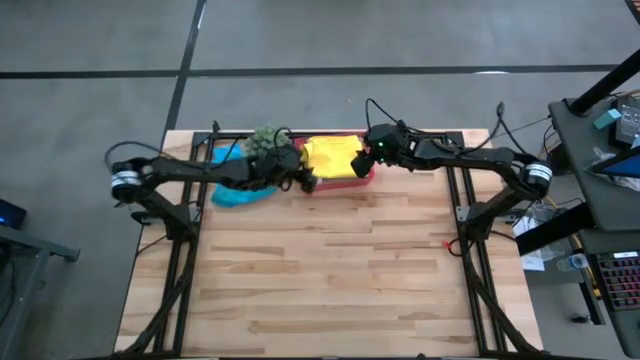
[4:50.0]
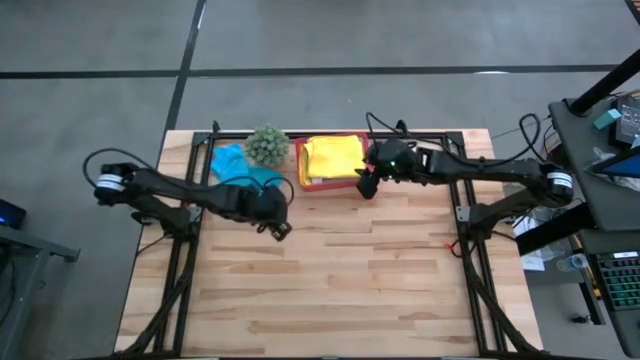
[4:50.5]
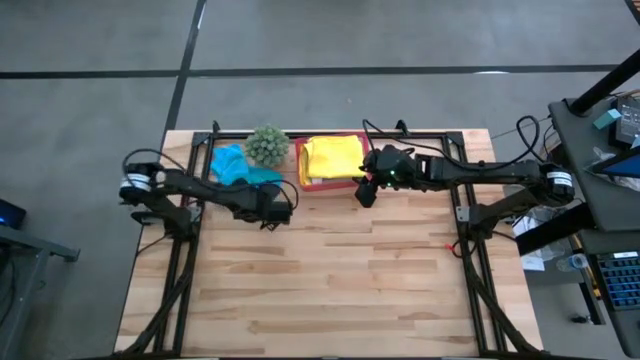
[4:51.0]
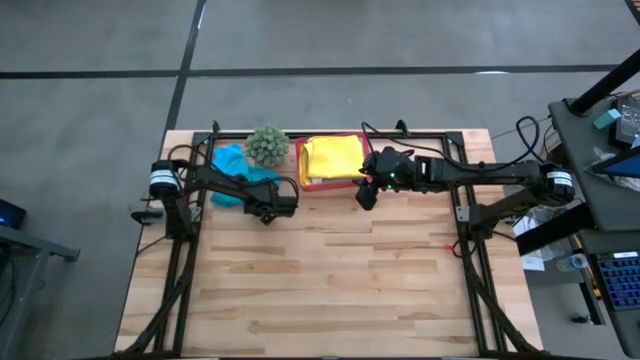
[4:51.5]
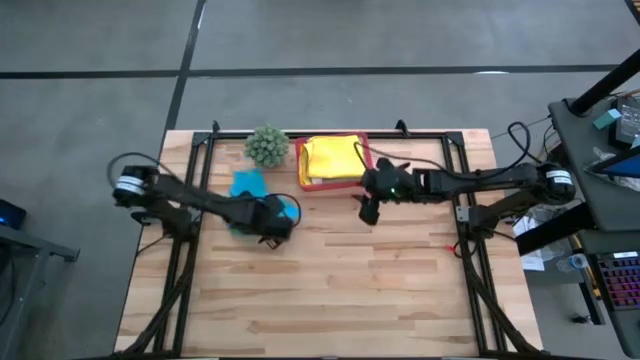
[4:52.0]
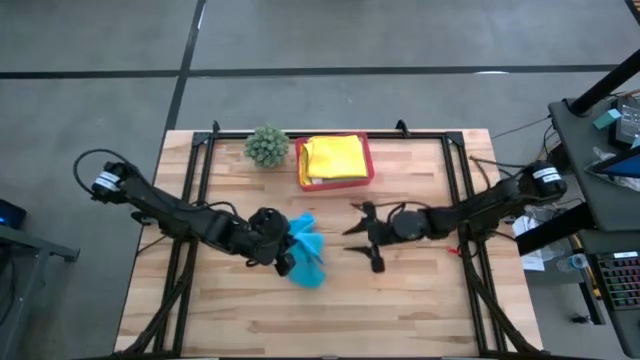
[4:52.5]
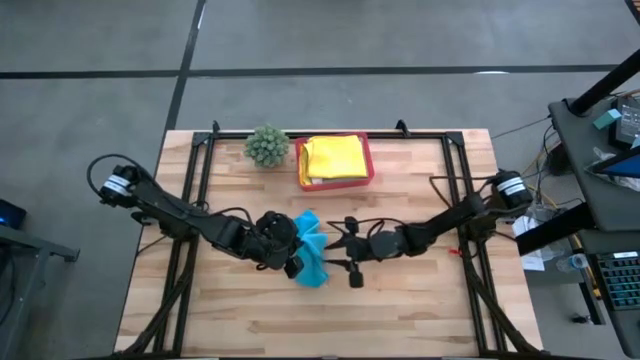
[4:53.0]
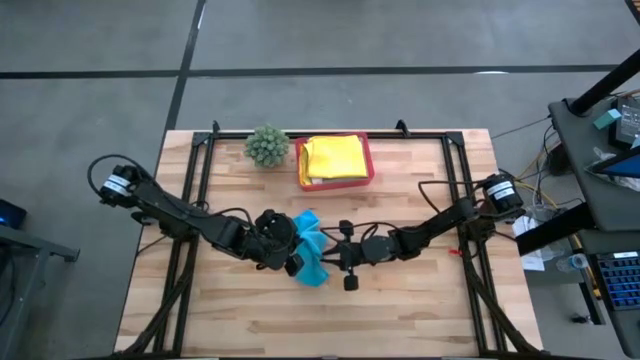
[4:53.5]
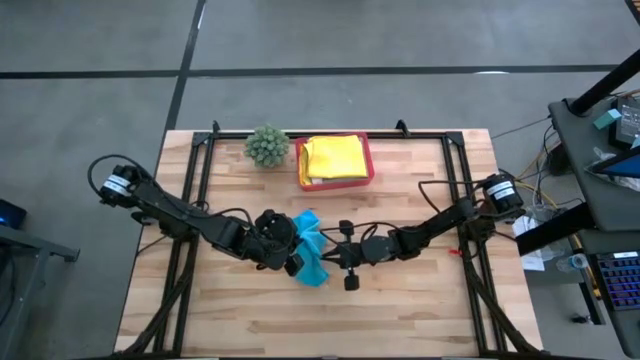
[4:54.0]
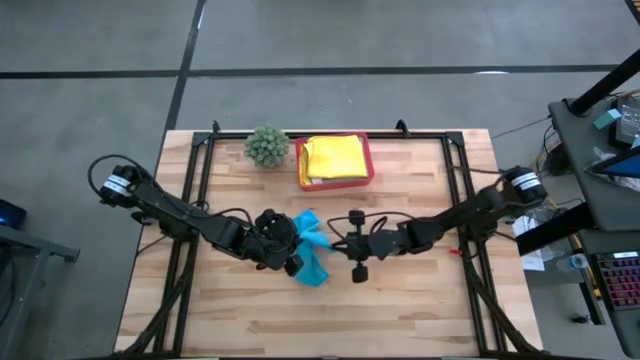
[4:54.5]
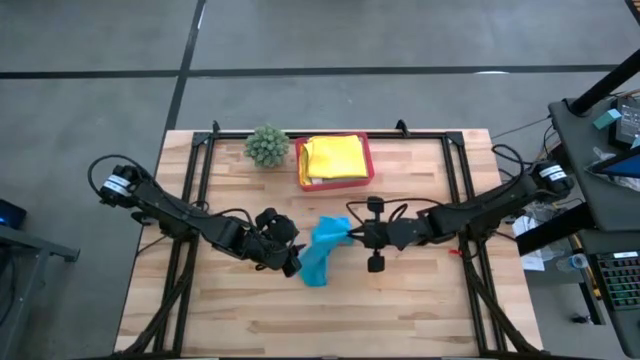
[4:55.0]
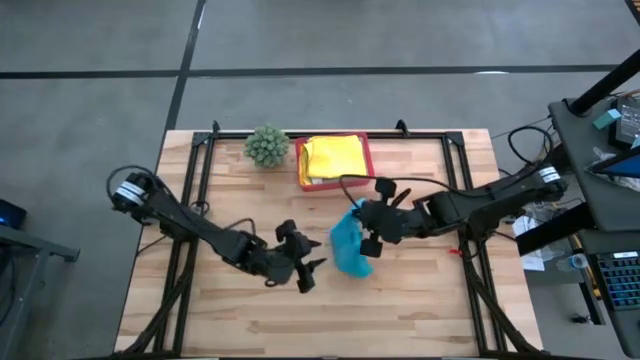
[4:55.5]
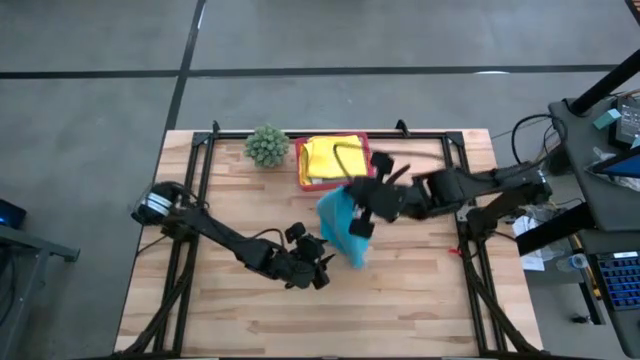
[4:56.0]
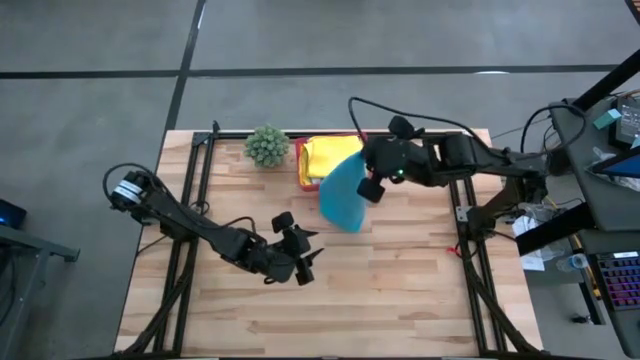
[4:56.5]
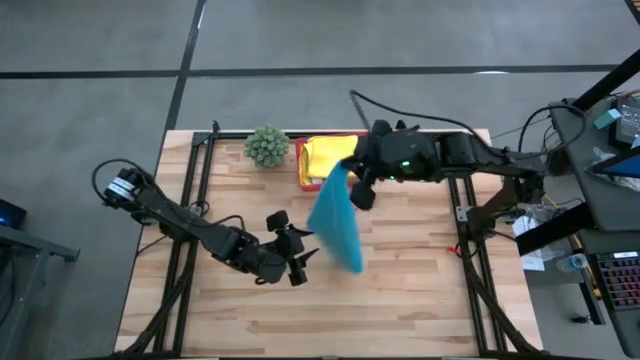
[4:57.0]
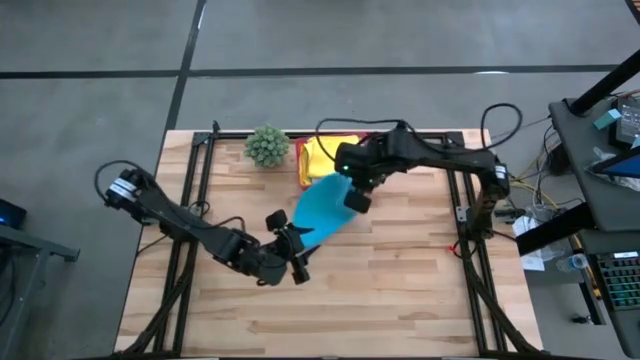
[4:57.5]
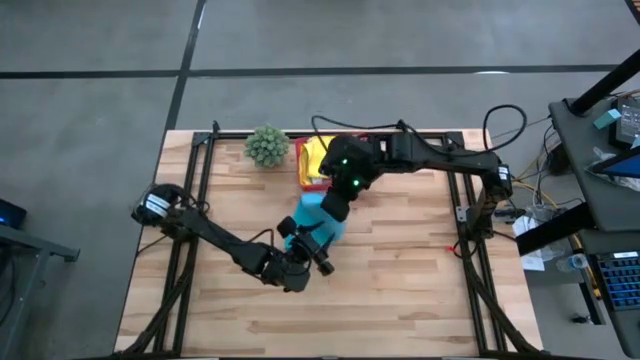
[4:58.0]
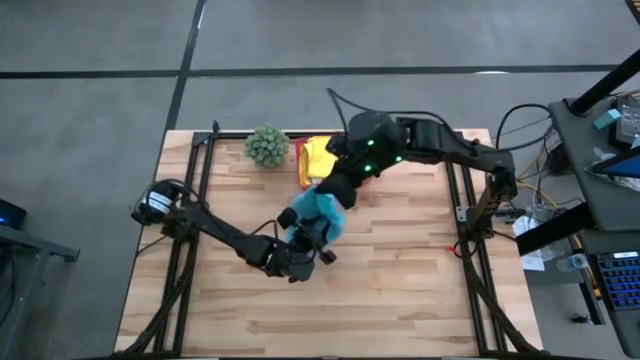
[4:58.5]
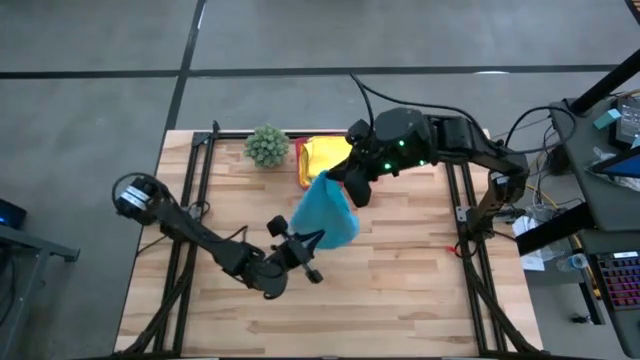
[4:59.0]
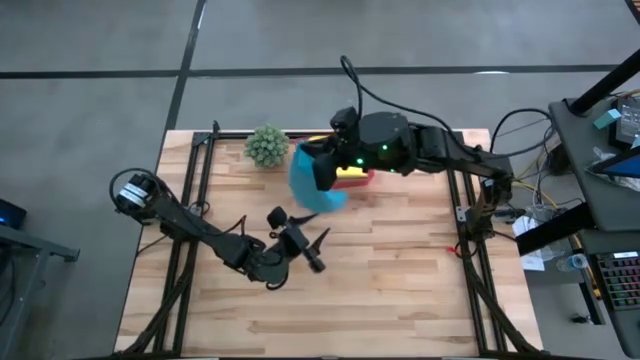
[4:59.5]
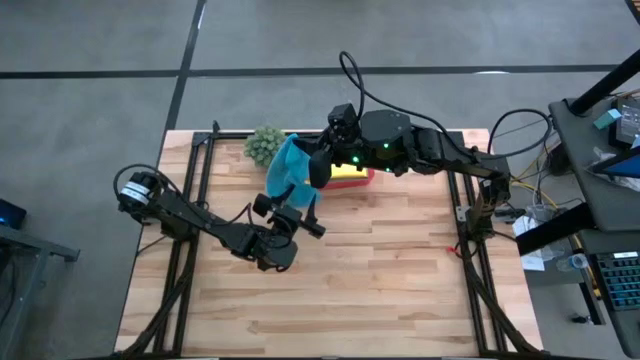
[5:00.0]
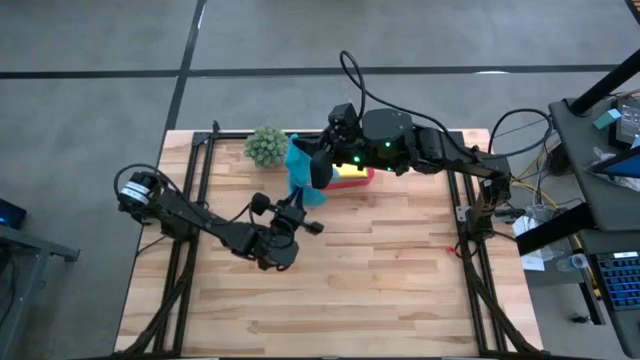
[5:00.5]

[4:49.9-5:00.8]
Task: Fold microfiber towels
Fold the blue microfiber towel

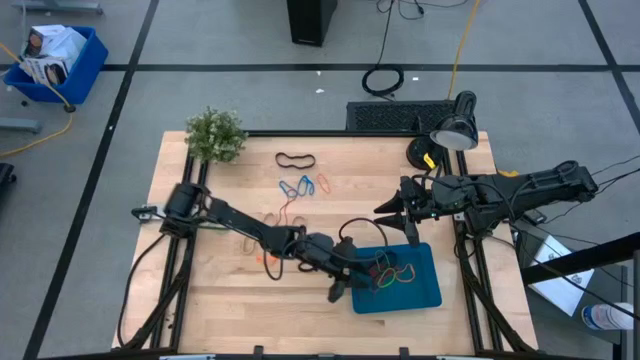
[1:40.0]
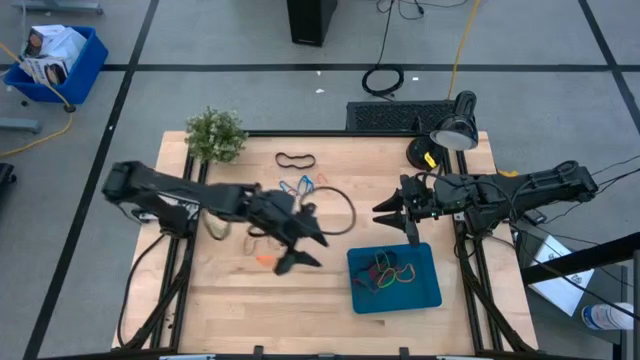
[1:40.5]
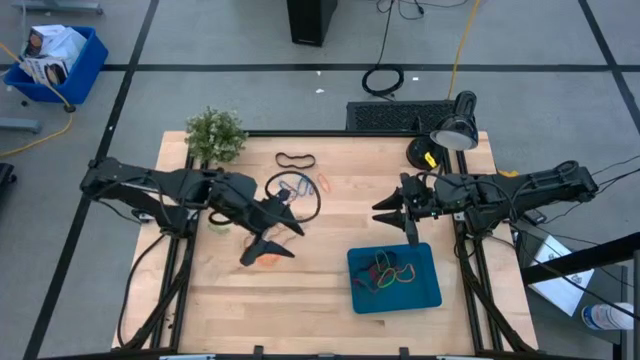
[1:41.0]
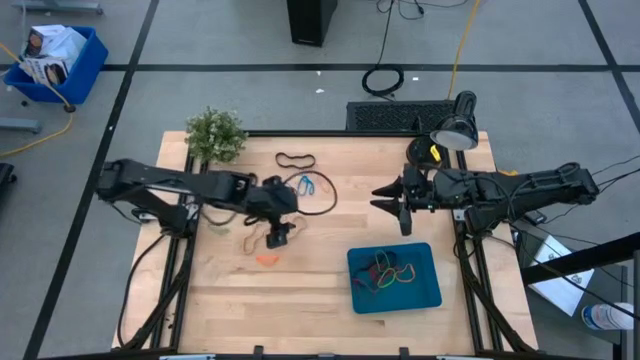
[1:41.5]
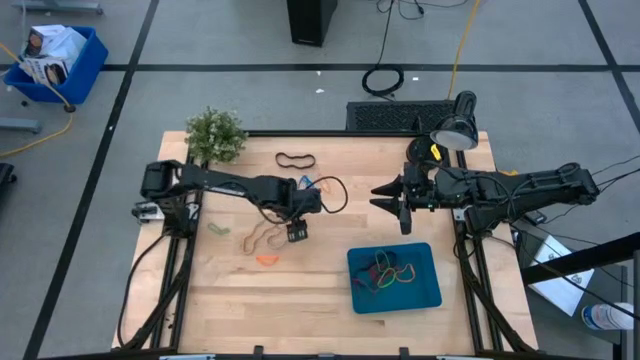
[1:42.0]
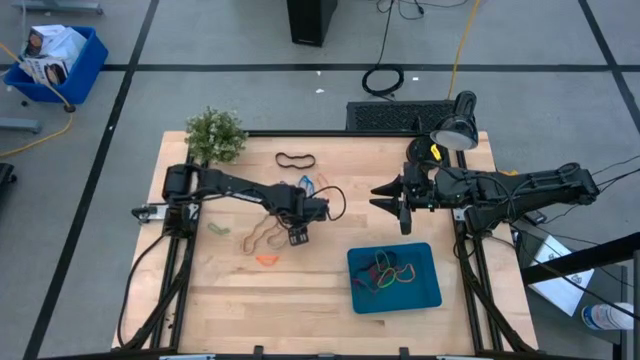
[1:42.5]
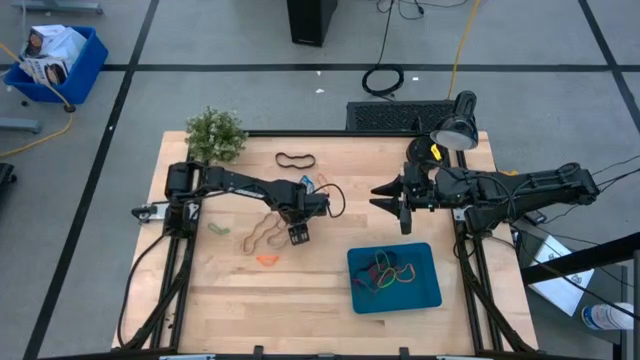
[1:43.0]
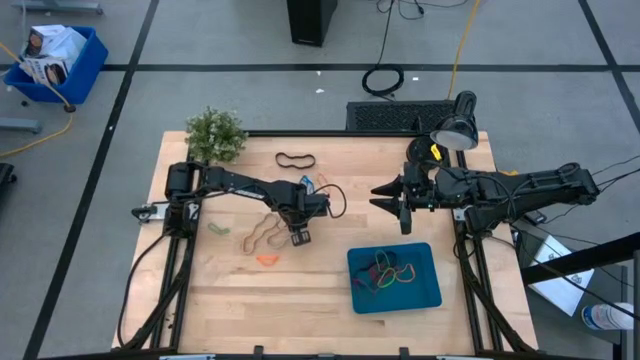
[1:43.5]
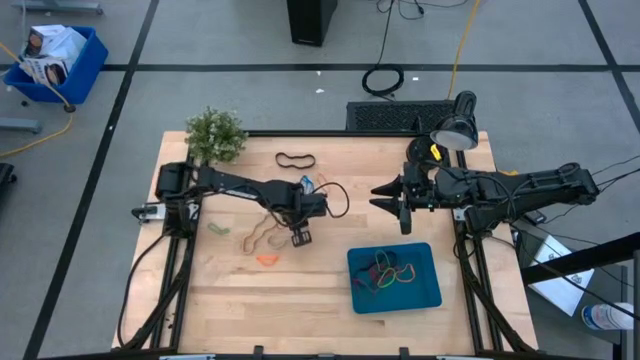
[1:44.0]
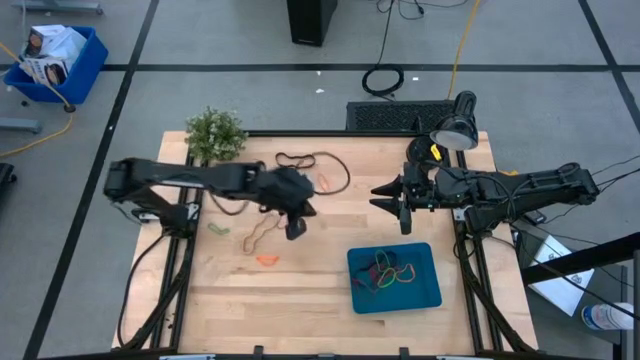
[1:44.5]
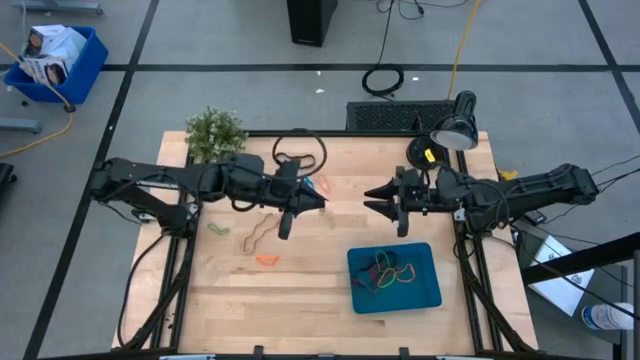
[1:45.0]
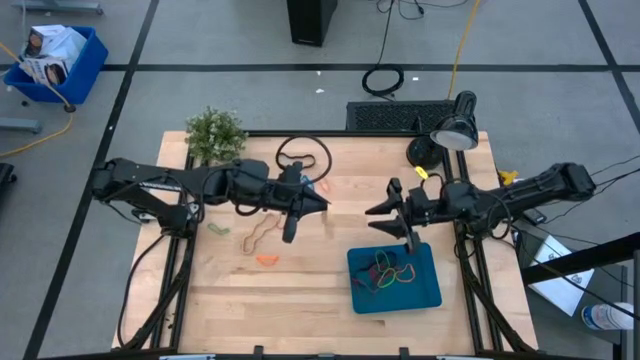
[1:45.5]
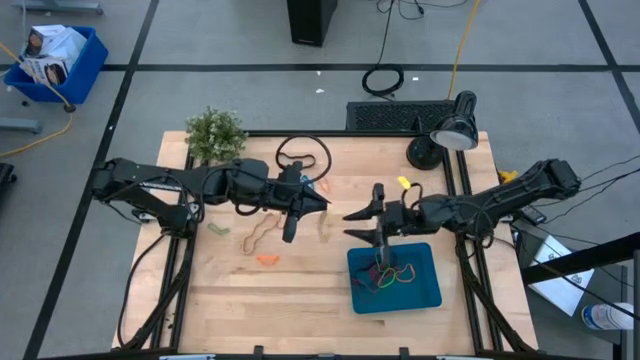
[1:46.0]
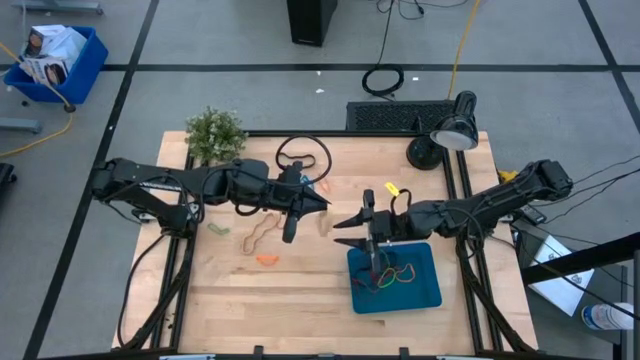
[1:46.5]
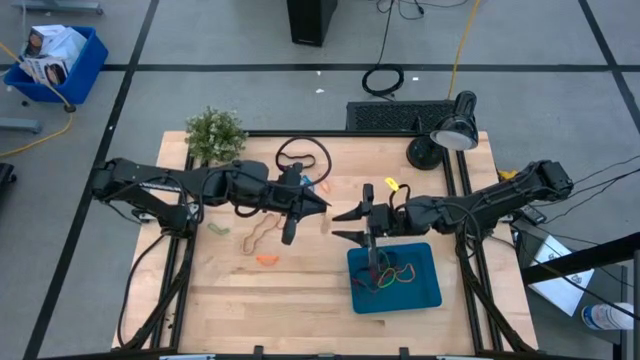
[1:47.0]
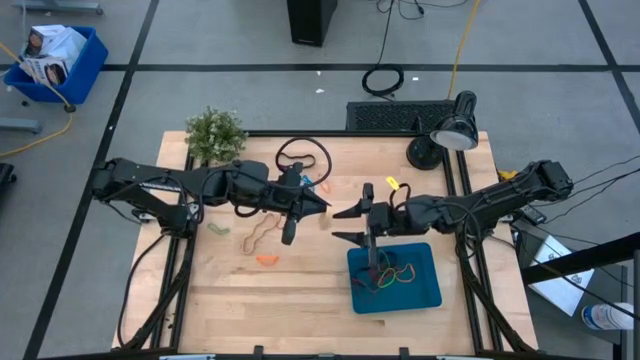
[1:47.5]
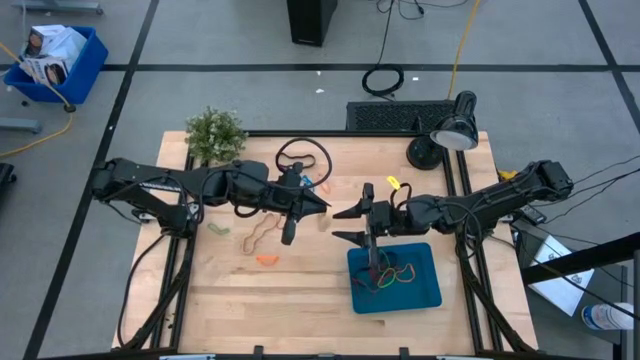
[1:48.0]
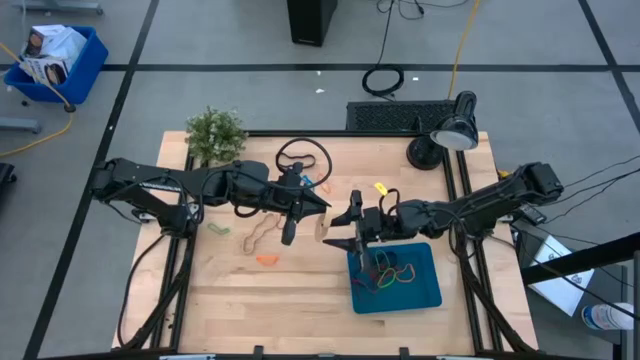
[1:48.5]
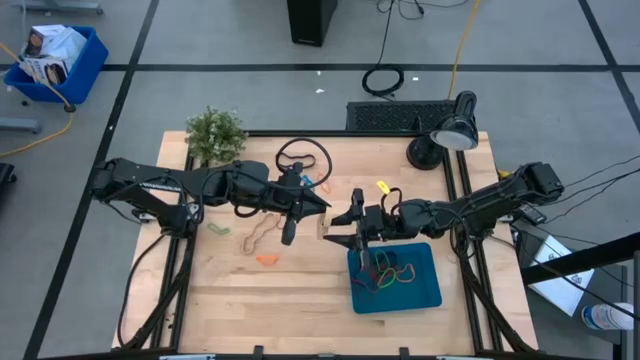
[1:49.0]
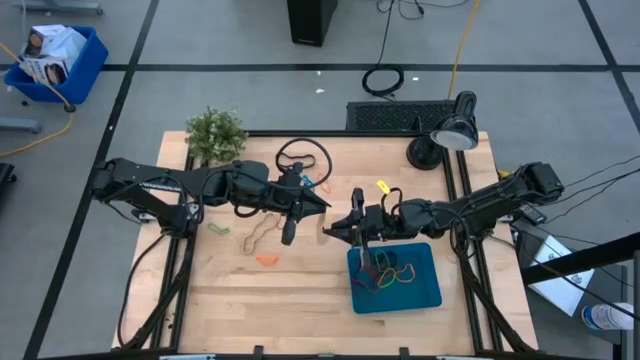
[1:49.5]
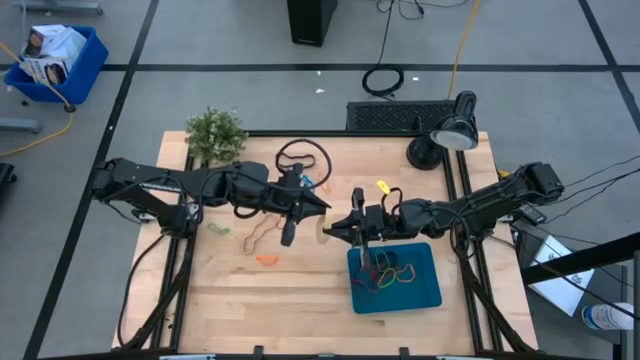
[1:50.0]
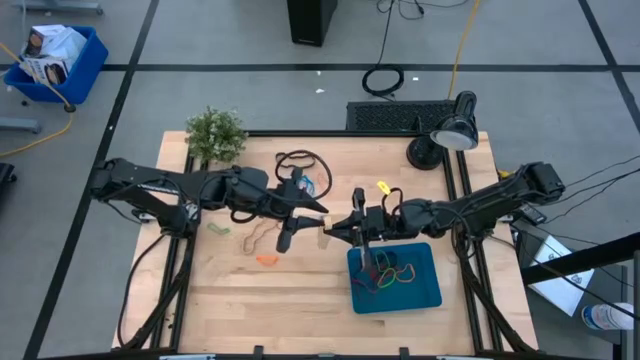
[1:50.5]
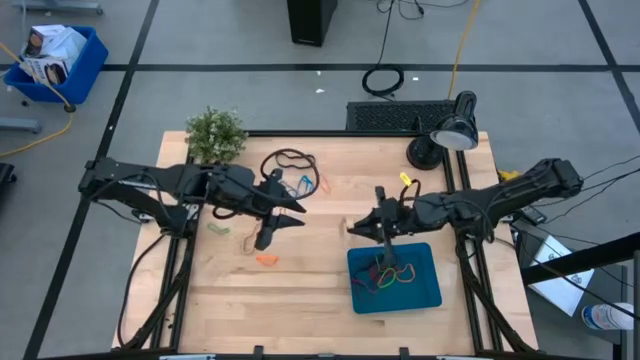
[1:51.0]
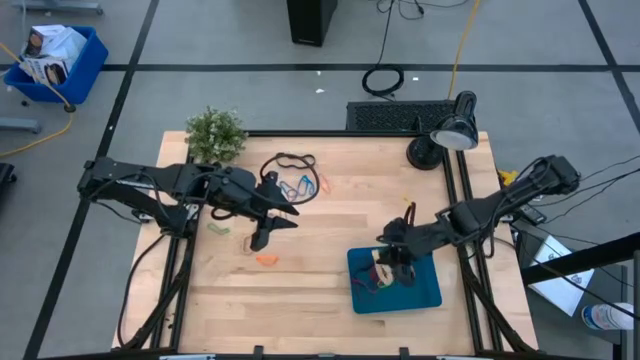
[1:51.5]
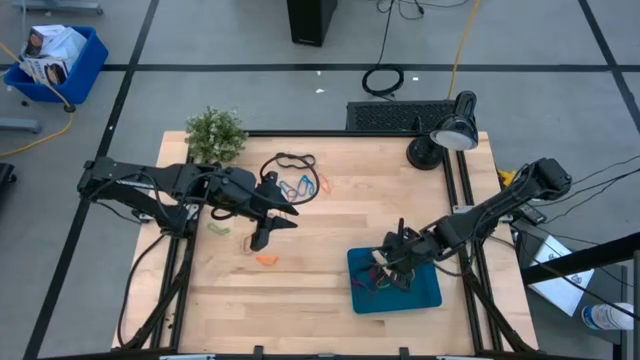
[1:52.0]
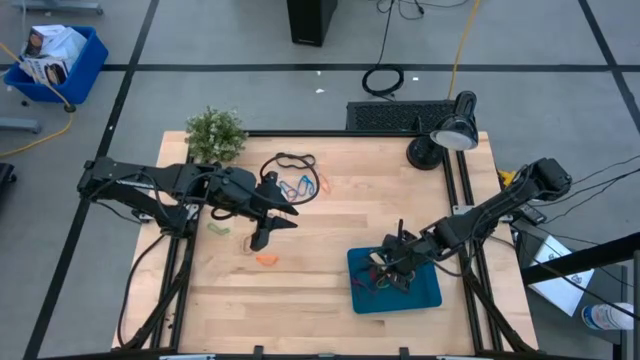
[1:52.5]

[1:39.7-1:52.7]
Task: Pick and place rubber bands into bin
Put the light brown rubber band into the blue bin
